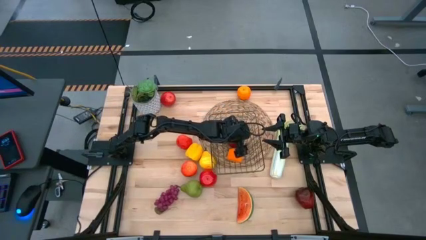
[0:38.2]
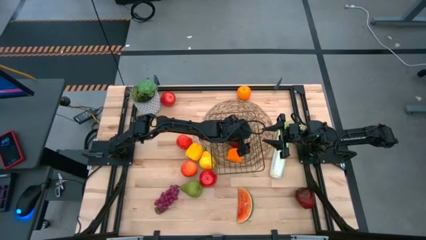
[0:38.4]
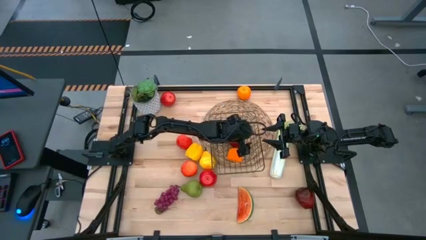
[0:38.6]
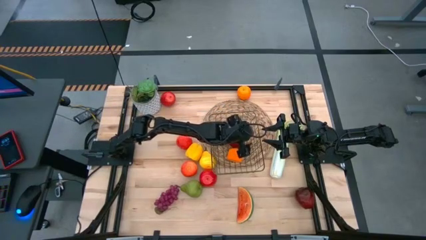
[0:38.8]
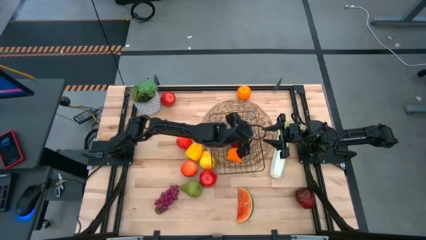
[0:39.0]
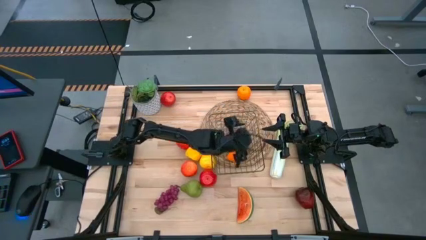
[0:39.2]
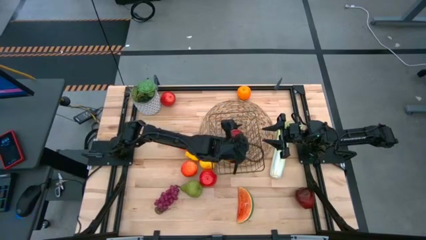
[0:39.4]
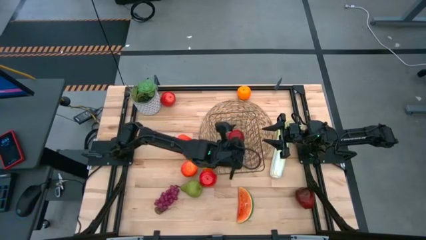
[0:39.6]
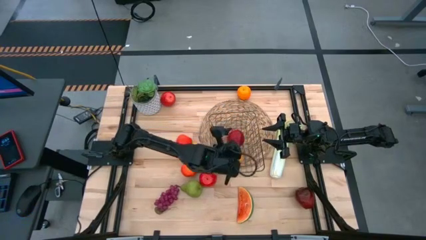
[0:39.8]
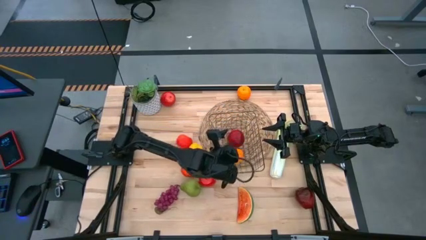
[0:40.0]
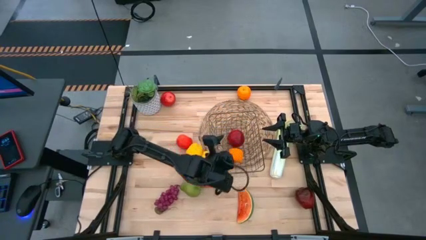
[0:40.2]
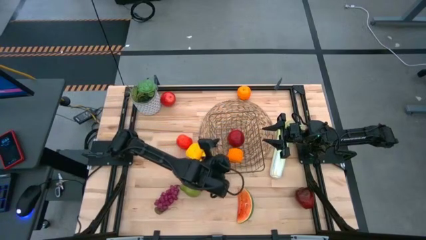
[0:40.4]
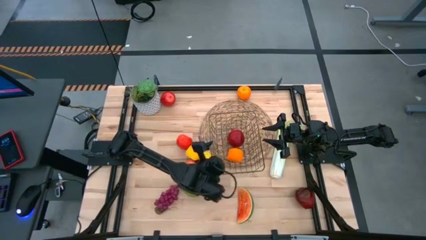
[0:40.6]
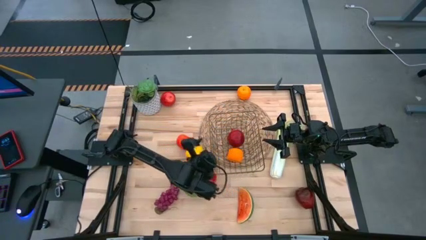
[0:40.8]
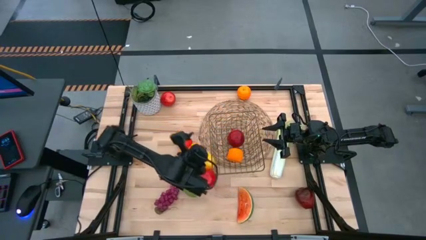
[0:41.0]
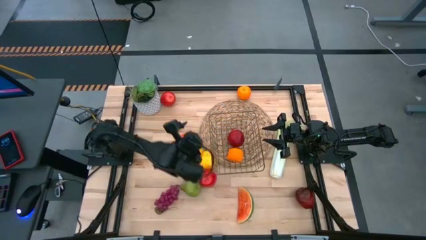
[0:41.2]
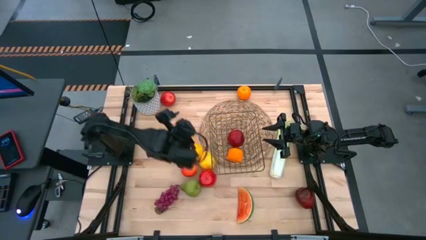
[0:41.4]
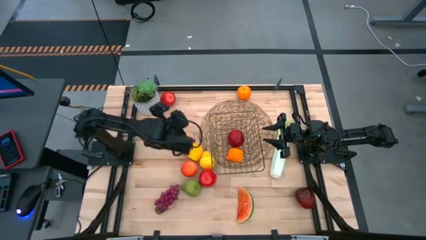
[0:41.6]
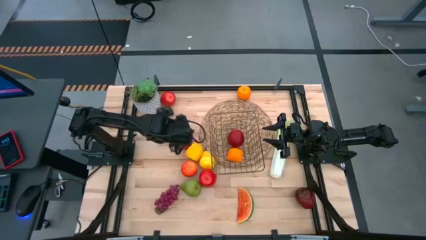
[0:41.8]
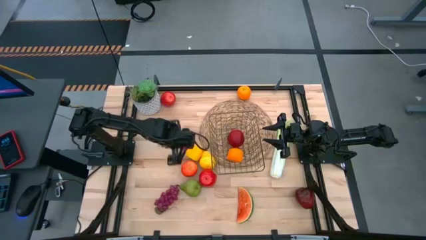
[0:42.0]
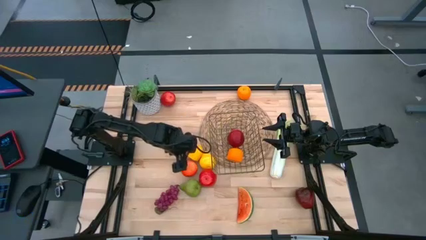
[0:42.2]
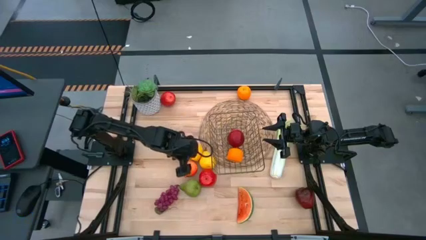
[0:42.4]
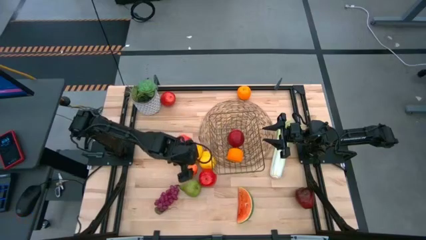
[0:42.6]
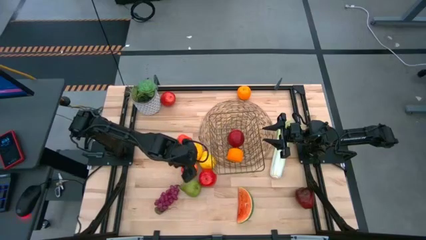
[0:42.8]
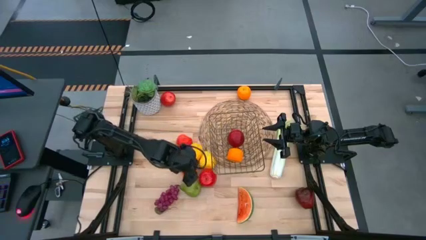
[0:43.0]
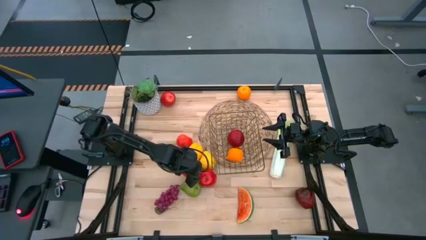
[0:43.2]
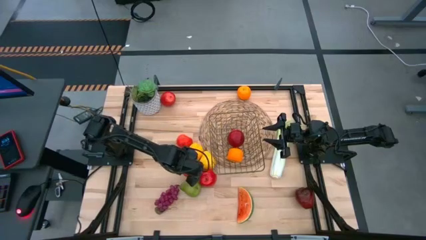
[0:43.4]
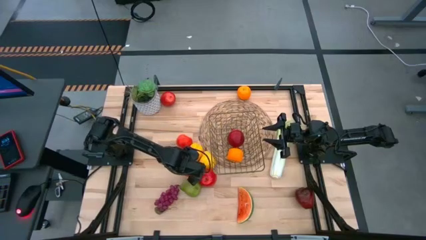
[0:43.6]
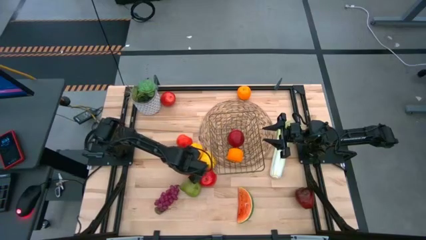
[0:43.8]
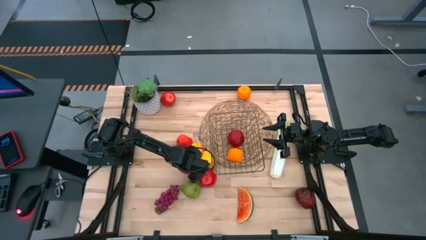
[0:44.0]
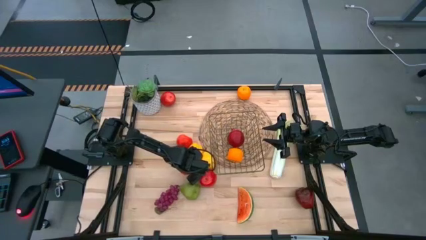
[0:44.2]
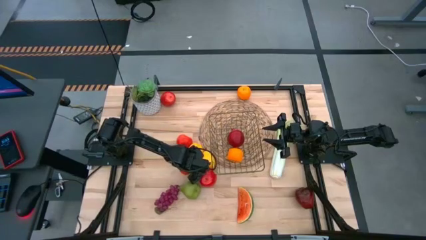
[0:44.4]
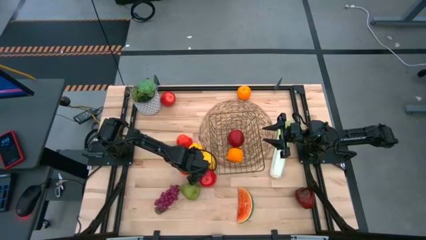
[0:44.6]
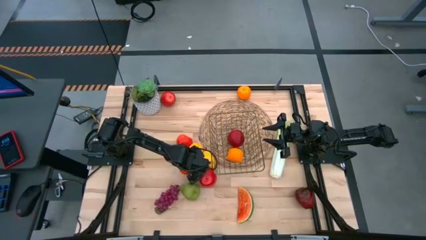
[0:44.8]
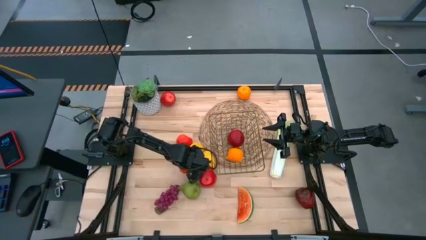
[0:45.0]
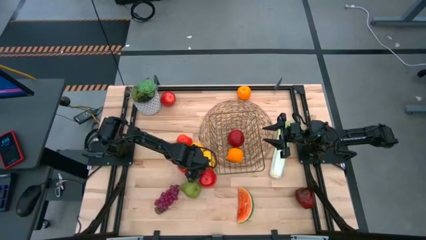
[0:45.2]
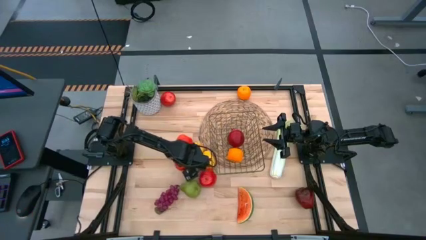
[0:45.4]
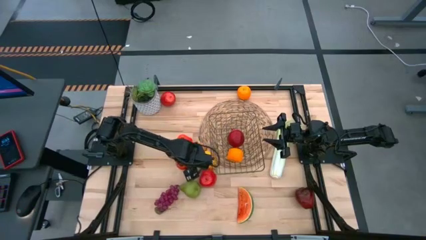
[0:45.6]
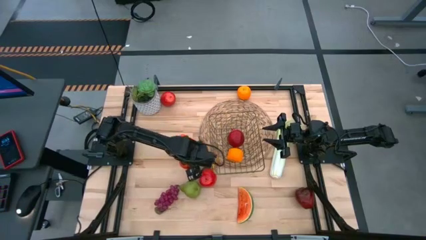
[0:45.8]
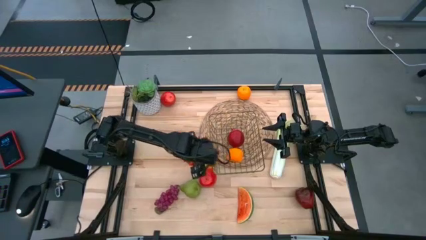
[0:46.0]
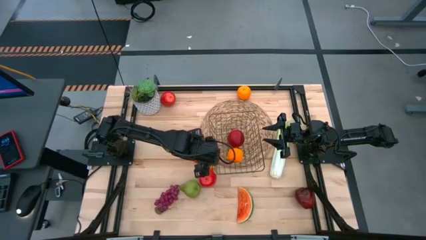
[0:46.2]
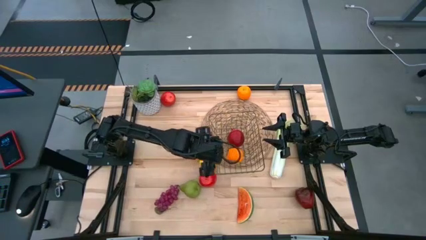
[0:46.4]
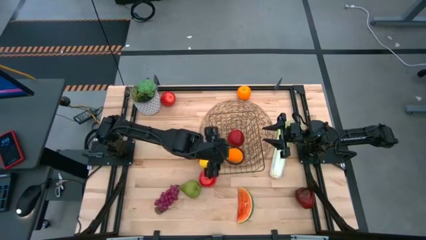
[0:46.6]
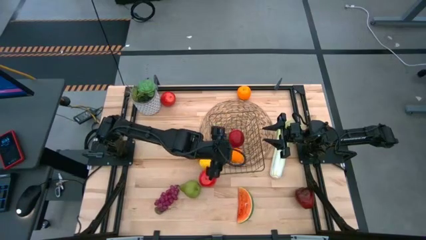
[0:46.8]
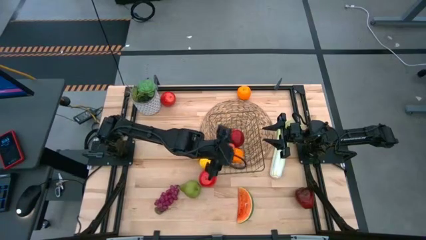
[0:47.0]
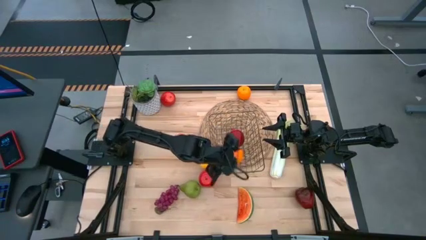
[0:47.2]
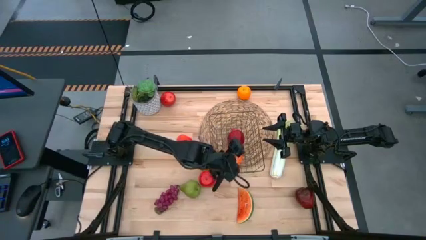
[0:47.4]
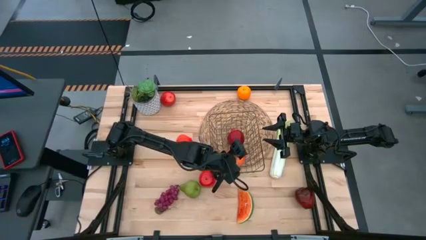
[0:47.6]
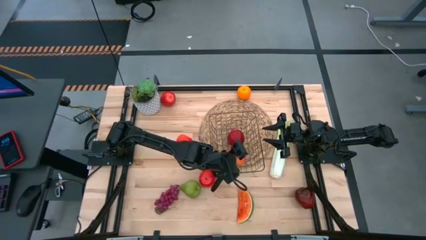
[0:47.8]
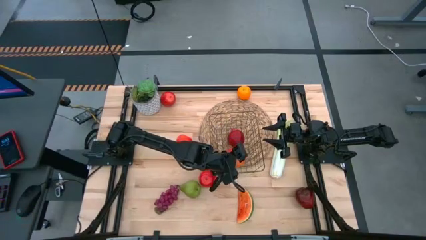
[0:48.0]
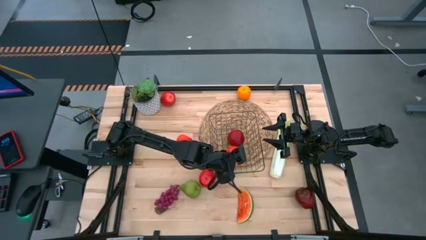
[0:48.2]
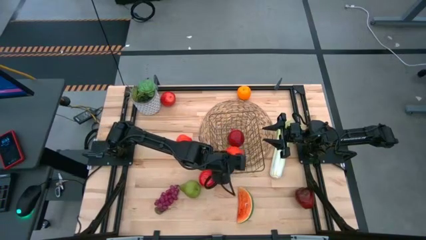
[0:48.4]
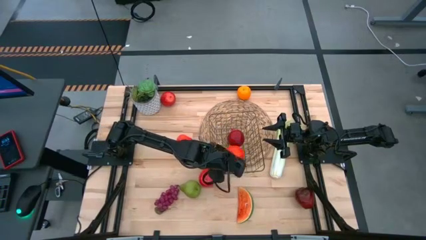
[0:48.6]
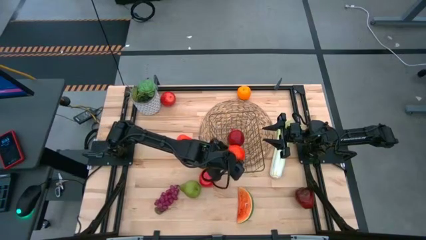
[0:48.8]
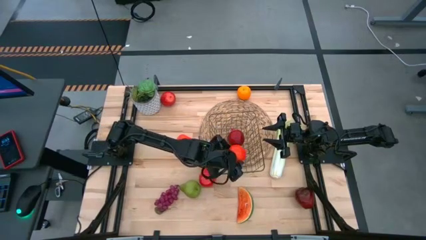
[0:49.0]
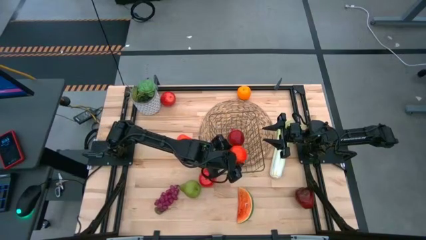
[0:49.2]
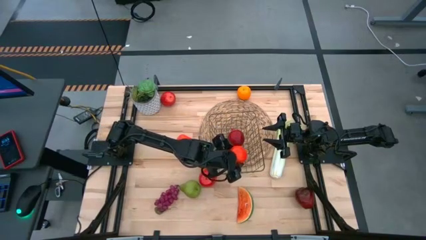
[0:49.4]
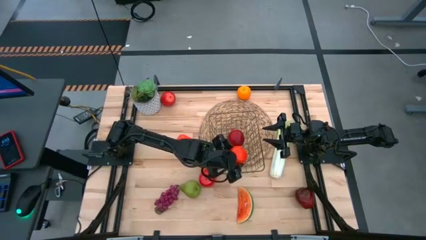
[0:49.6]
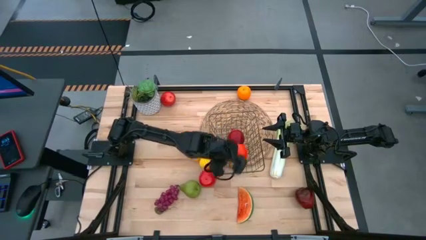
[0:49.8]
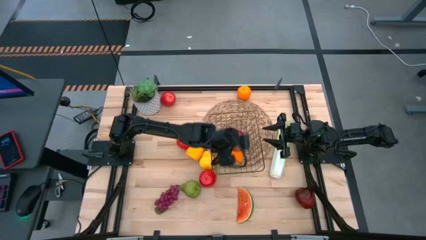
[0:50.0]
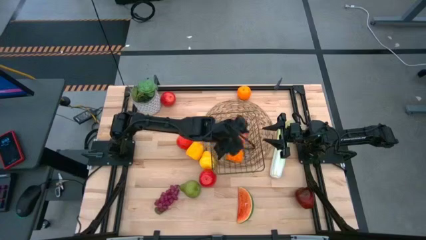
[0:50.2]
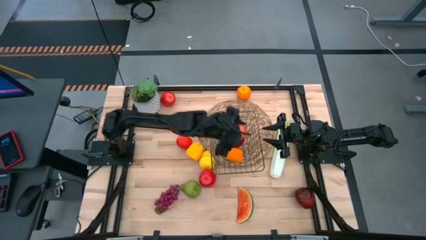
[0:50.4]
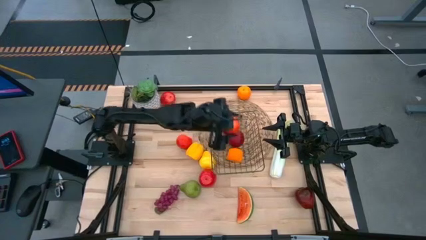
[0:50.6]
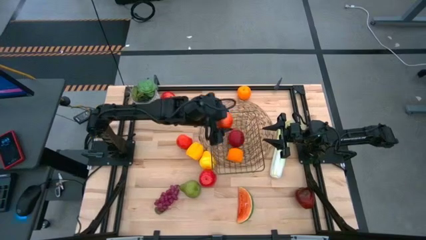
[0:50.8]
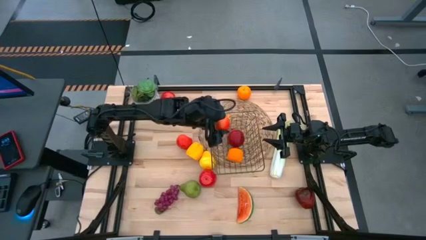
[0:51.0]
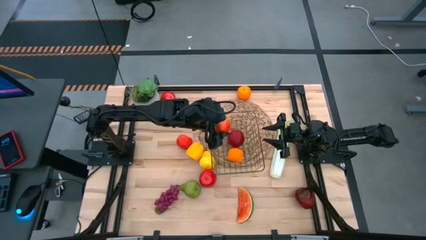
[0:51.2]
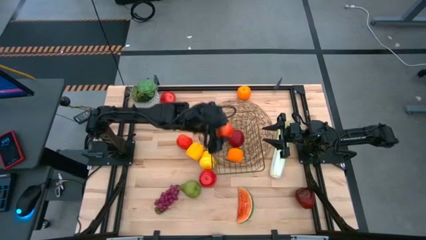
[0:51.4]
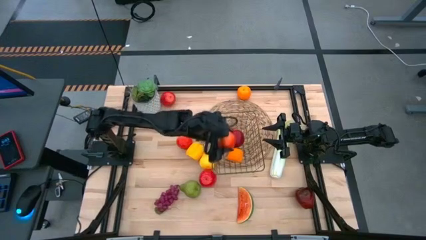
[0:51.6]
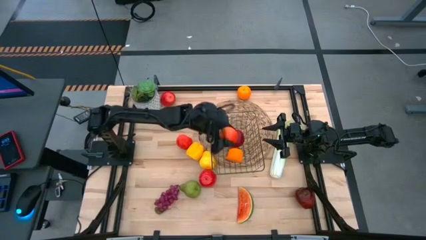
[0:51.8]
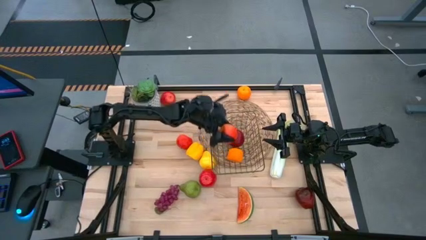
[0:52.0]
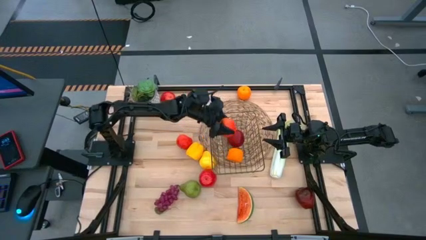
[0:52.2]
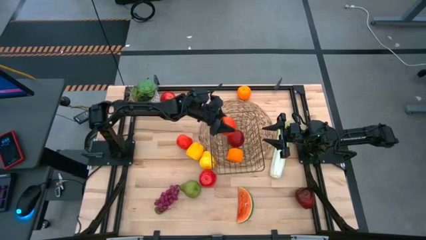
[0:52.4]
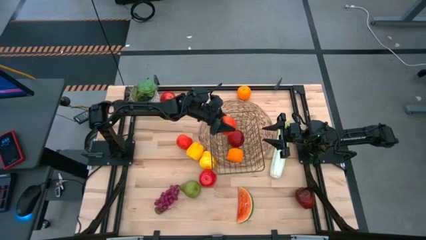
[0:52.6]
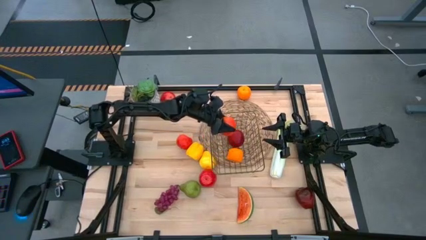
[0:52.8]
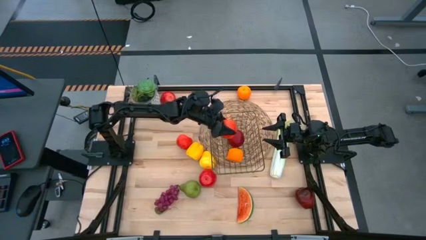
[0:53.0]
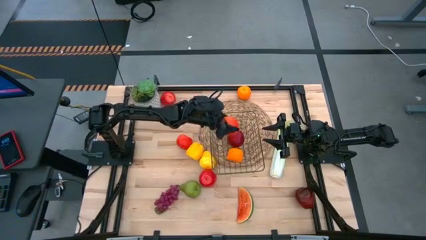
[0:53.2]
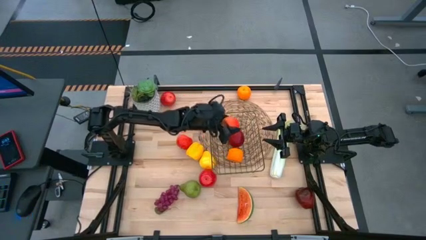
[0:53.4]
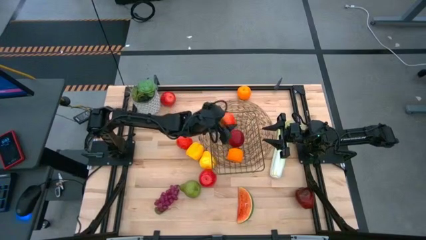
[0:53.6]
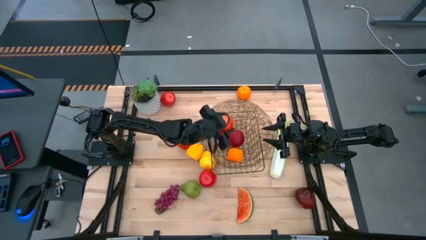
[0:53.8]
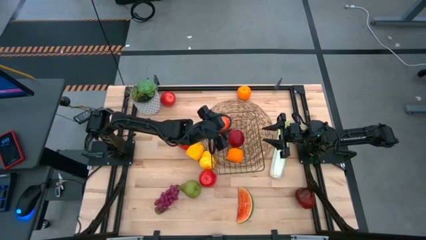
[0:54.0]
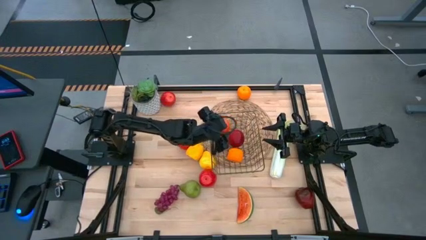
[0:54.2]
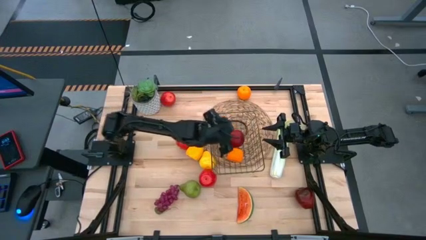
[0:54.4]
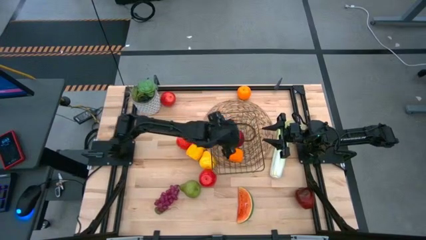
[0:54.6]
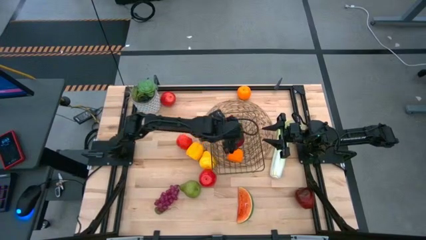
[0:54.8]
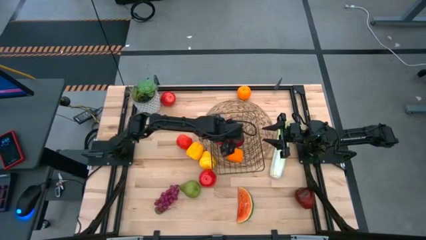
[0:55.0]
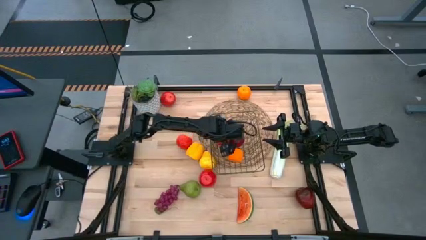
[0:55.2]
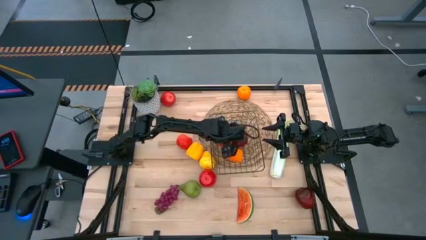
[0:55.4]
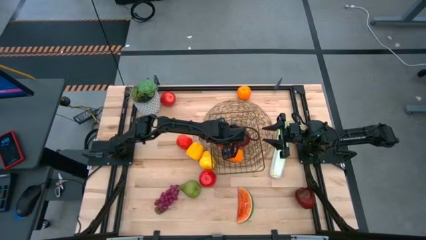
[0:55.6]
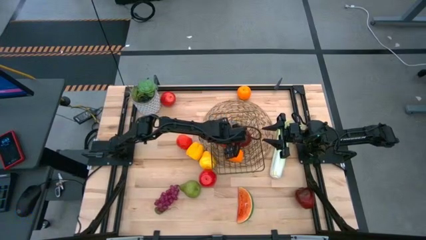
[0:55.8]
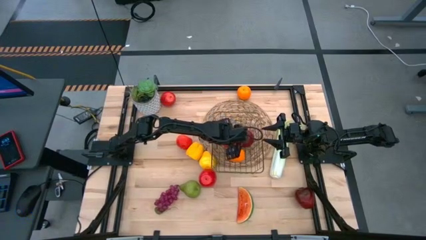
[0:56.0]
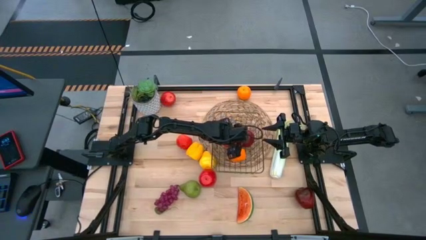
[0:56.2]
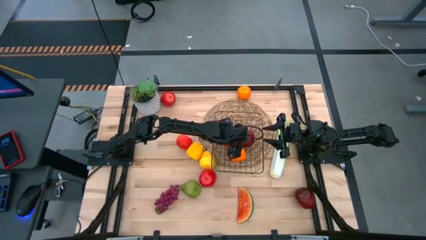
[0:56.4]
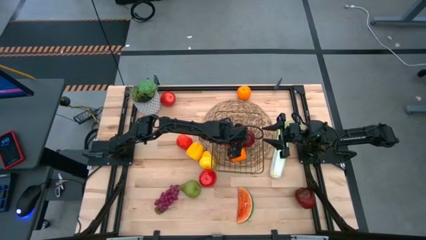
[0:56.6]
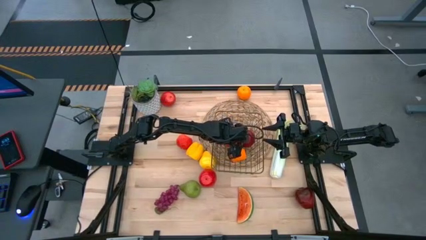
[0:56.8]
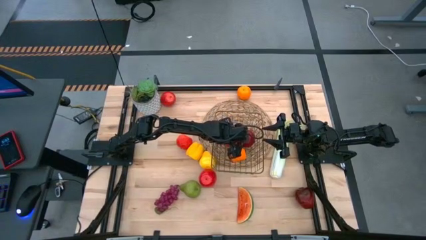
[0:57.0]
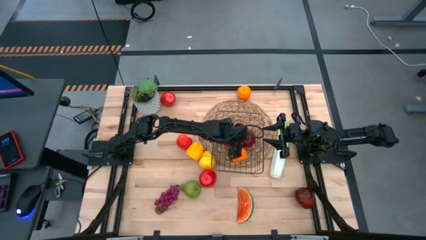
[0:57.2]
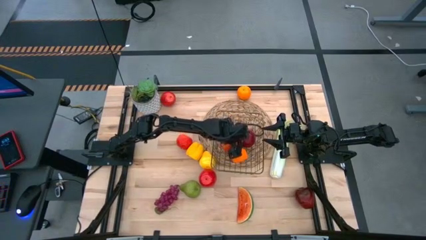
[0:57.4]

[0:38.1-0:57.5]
Task: Build produce basket
Put the red apple into the wire basket
